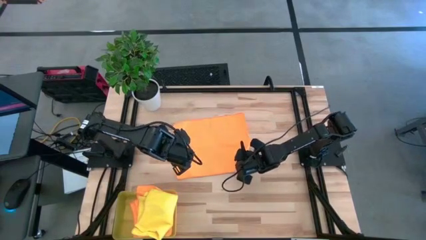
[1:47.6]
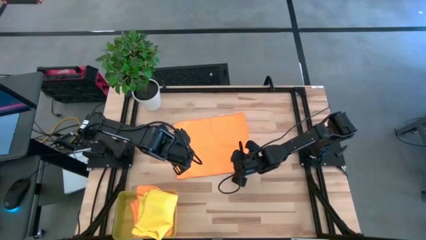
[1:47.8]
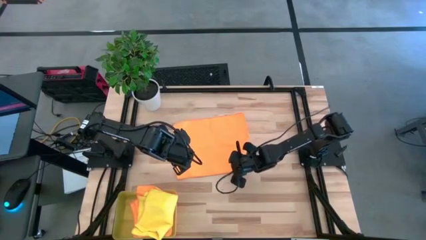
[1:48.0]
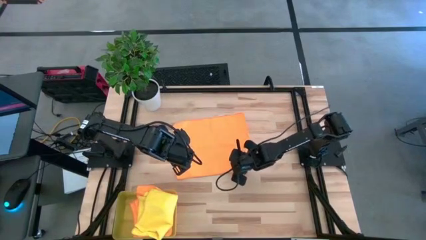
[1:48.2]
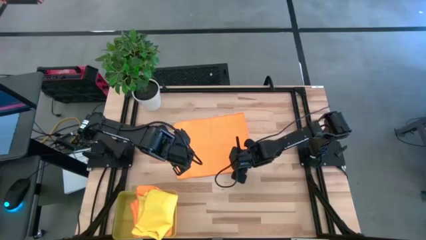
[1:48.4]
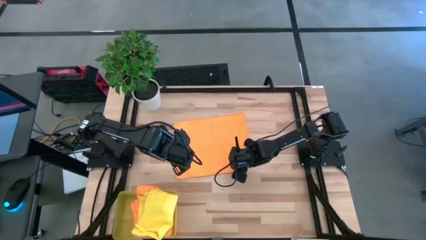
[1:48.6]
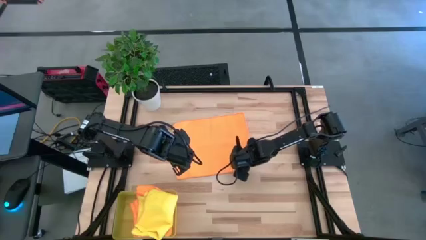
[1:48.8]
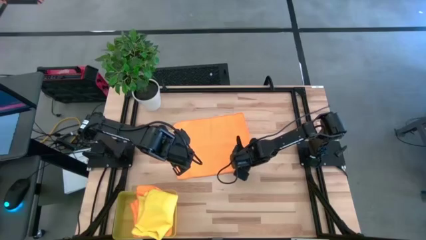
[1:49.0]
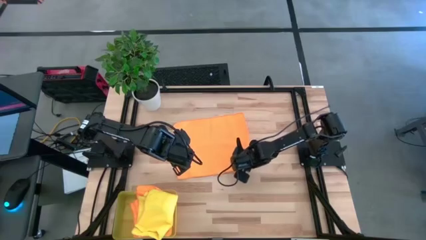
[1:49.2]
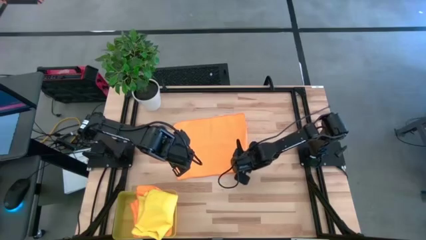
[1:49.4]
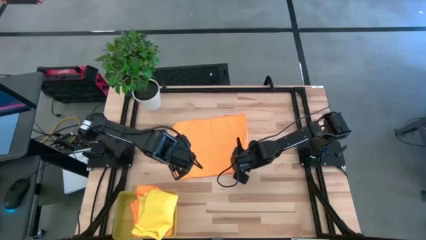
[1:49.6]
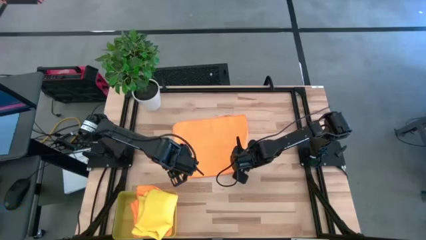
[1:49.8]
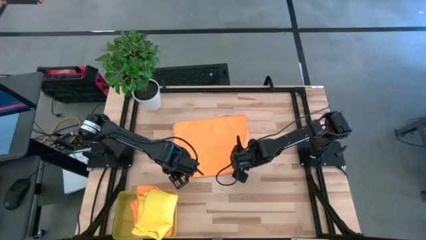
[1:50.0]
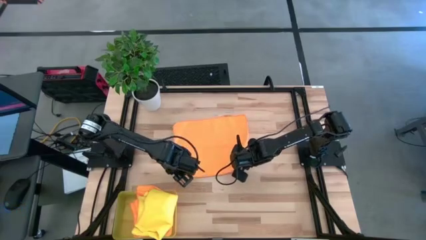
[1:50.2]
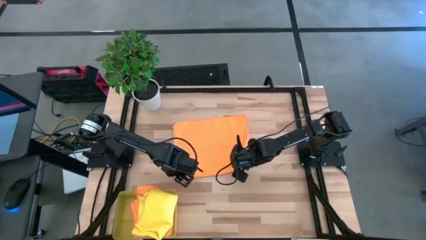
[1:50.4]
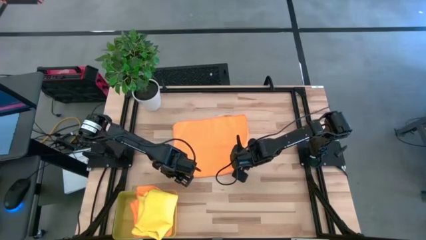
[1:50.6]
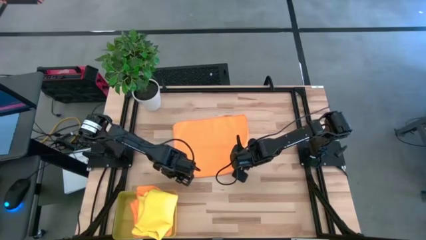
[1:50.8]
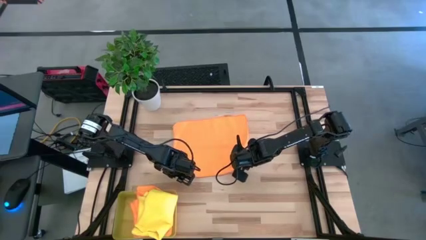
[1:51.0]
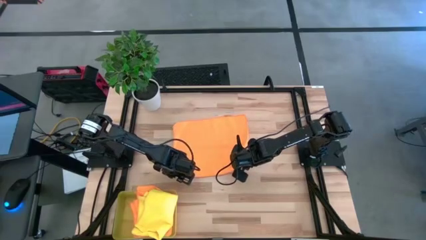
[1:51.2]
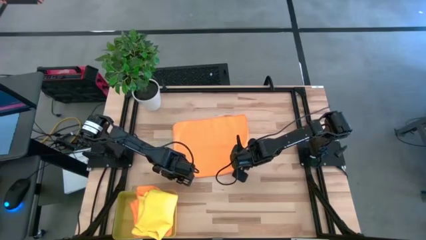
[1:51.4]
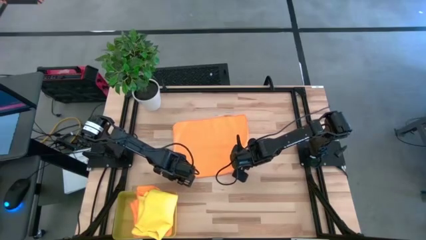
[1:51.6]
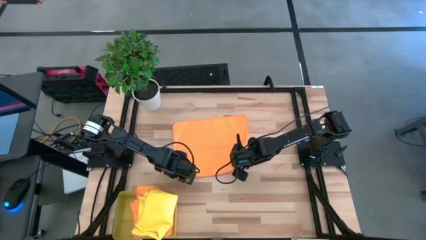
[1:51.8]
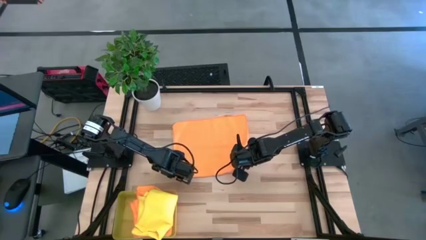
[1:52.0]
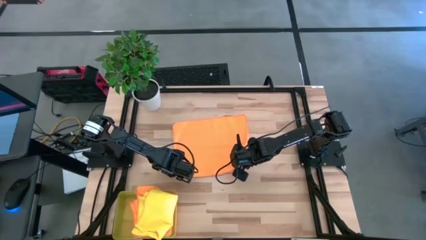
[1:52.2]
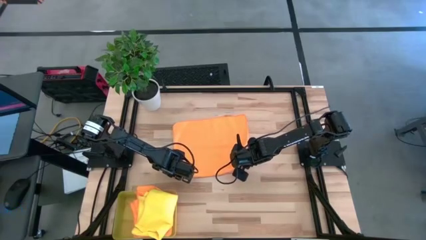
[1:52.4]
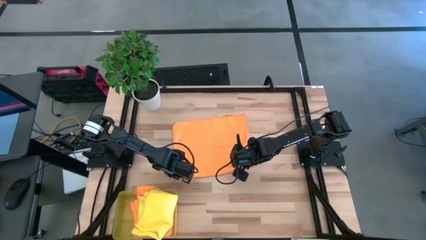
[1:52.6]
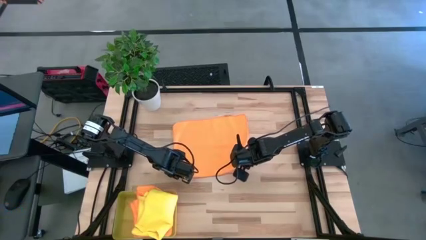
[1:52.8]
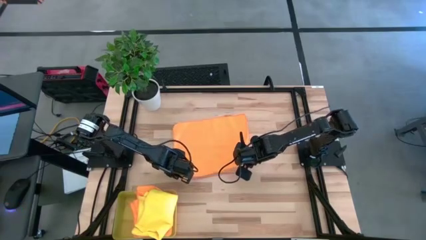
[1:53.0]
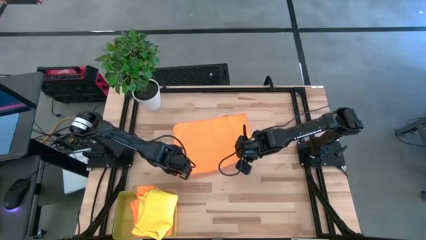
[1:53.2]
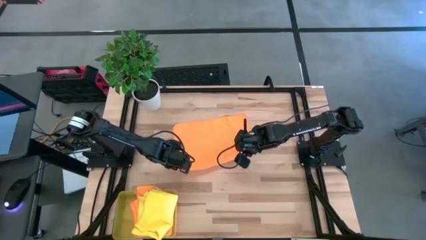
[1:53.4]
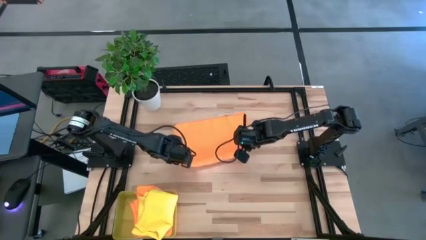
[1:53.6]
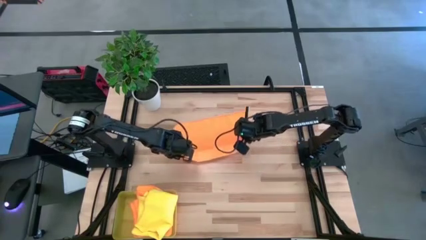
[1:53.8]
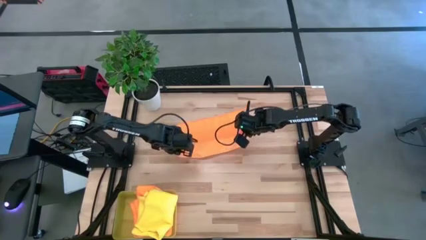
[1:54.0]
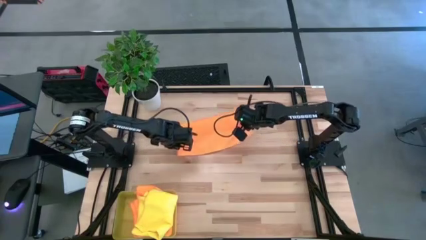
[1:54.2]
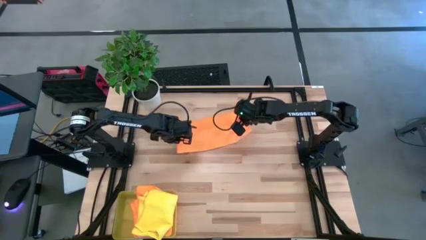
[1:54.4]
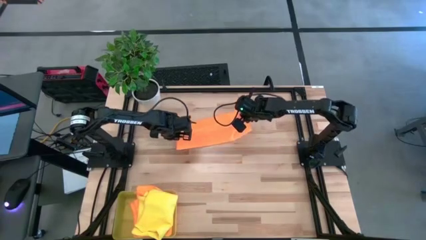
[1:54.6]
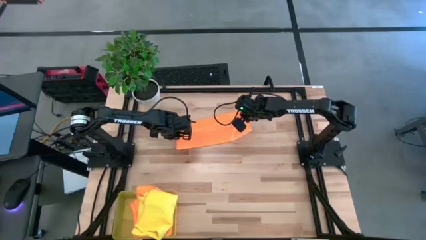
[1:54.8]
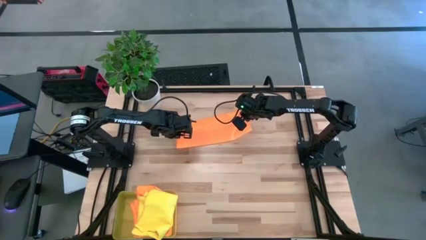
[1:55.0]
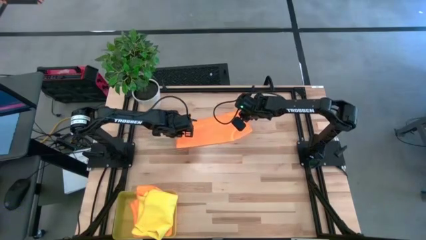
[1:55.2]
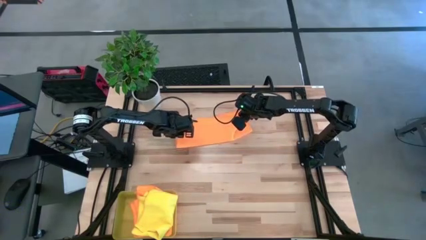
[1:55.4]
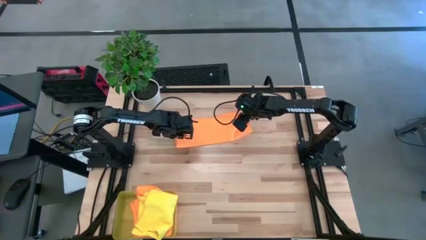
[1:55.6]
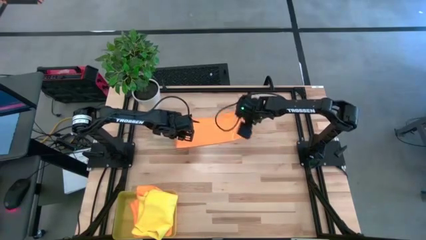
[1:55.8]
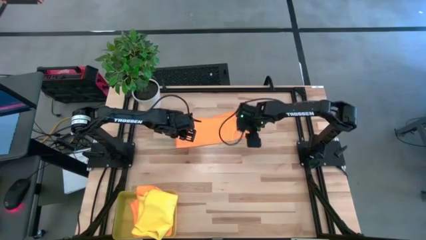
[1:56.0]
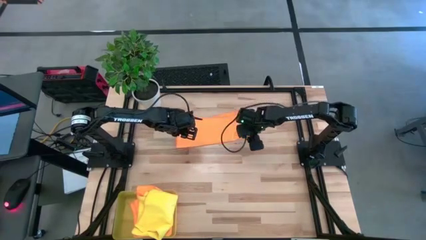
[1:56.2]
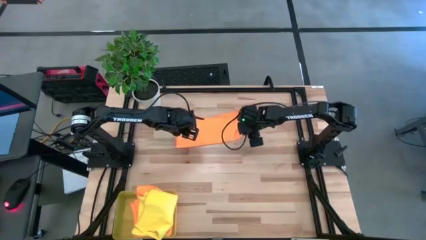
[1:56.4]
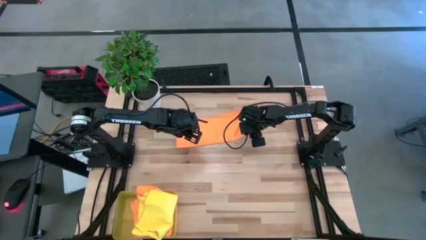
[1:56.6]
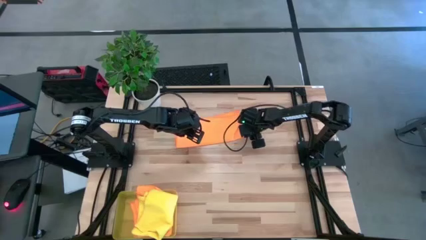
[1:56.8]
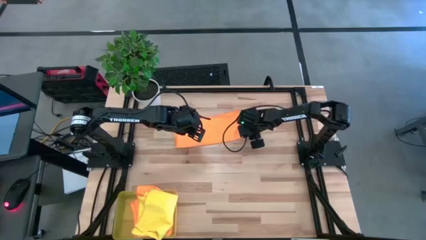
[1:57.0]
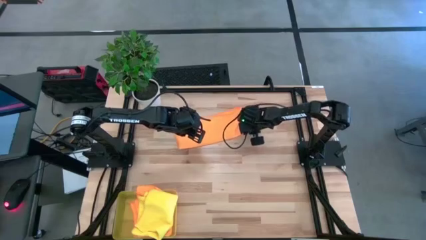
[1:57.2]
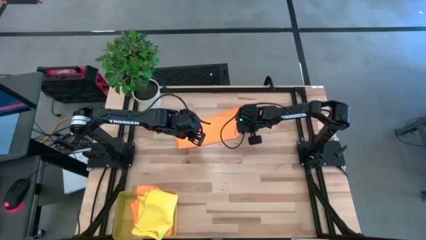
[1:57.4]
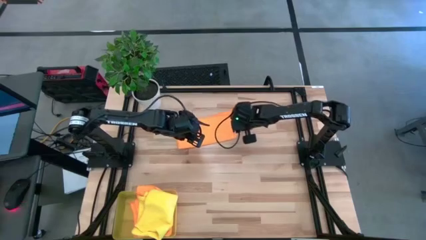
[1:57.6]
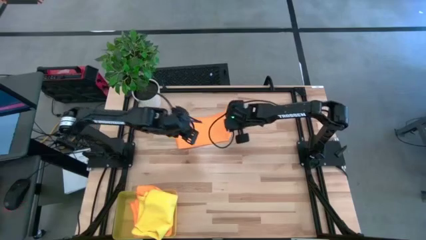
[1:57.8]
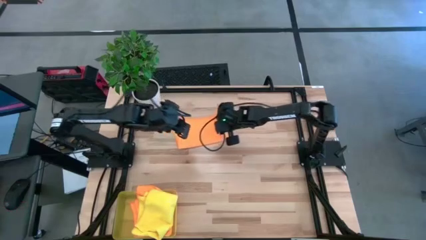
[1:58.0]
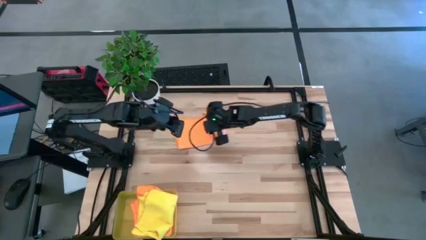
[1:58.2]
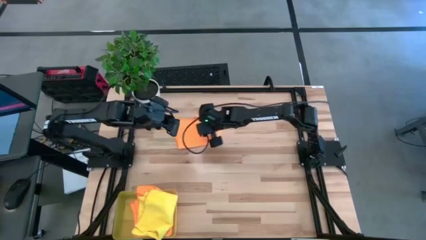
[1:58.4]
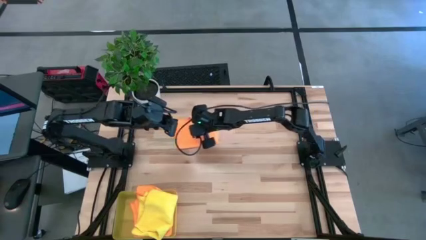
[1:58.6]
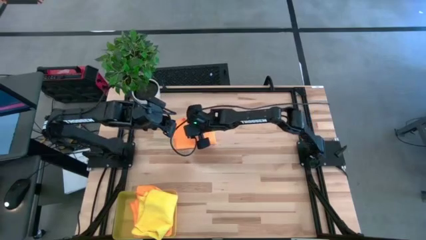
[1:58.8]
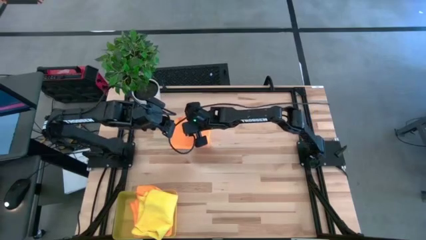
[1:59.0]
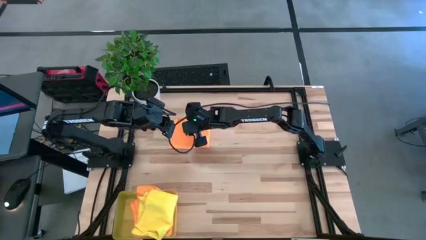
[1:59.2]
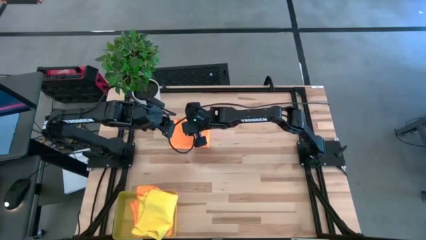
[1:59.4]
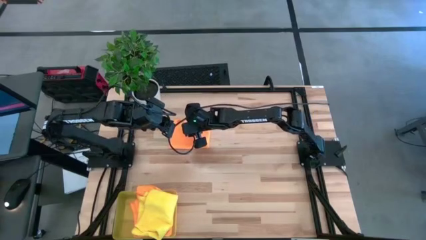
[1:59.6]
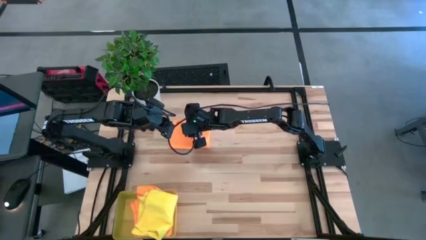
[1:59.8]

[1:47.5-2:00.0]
Task: Fold microfiber towels
Fold the orange microfiber towel

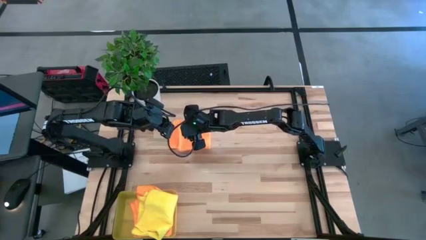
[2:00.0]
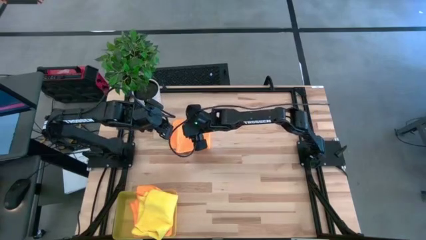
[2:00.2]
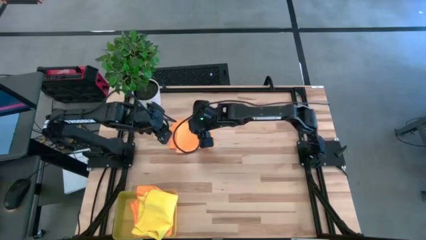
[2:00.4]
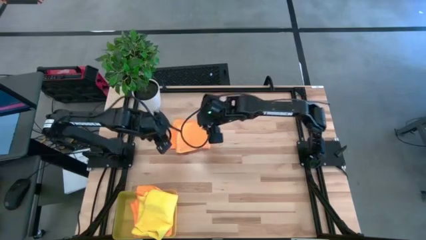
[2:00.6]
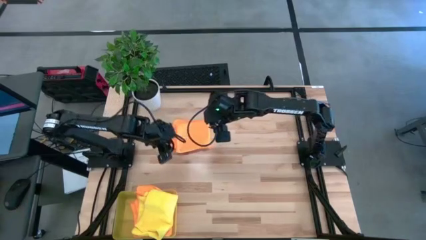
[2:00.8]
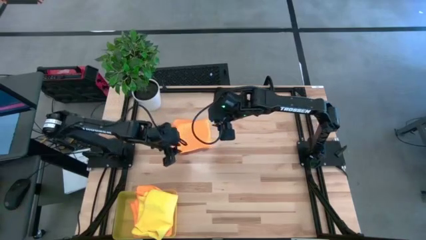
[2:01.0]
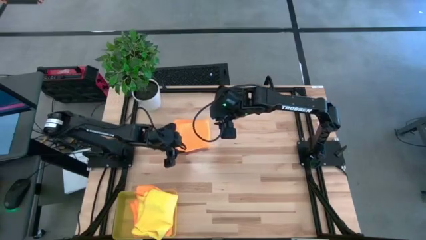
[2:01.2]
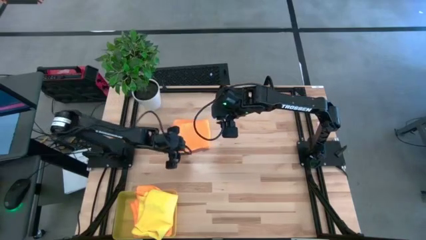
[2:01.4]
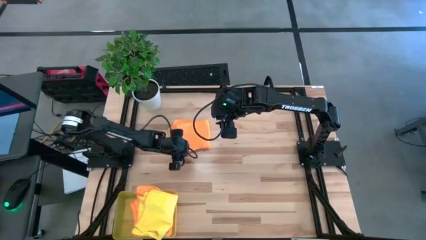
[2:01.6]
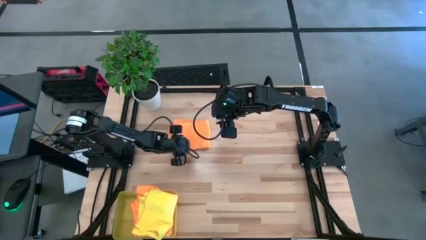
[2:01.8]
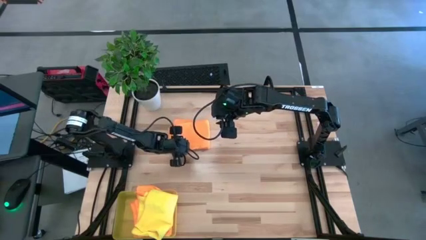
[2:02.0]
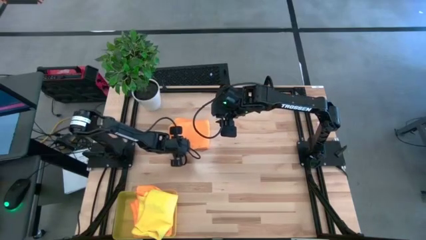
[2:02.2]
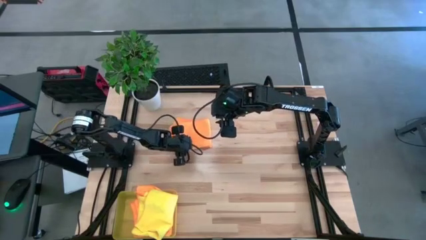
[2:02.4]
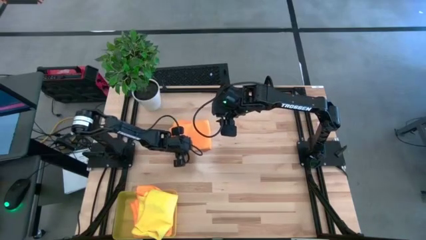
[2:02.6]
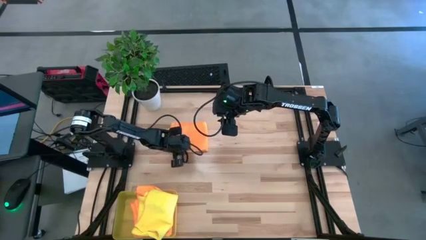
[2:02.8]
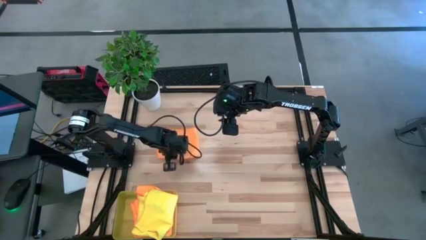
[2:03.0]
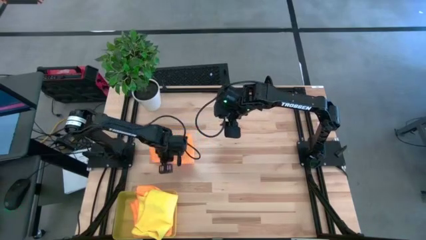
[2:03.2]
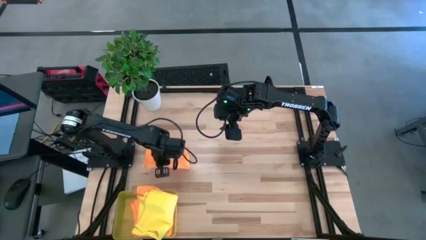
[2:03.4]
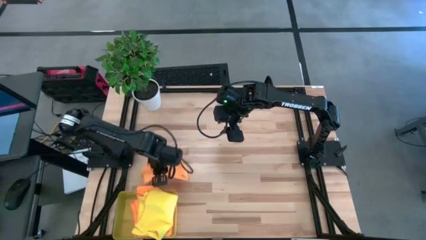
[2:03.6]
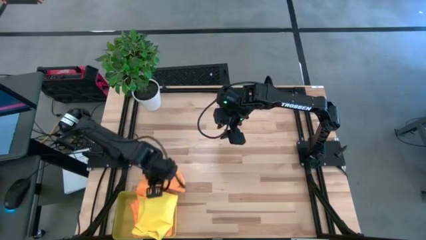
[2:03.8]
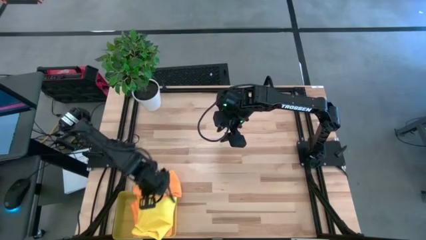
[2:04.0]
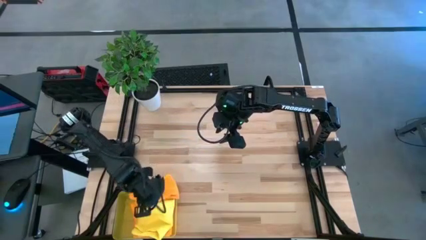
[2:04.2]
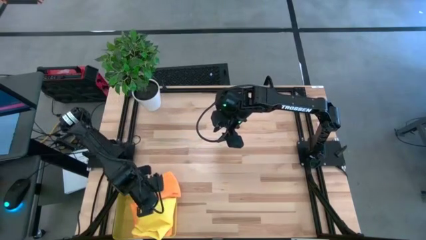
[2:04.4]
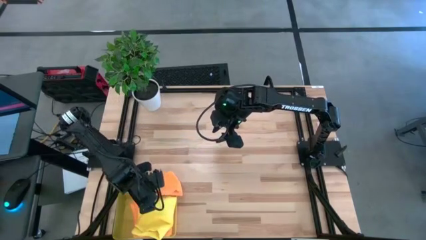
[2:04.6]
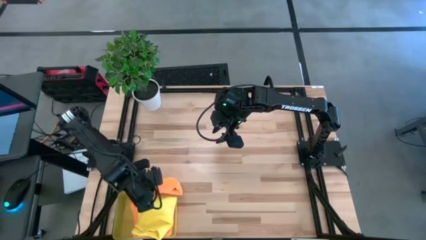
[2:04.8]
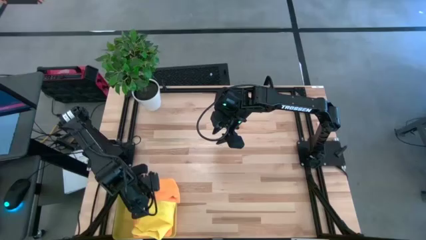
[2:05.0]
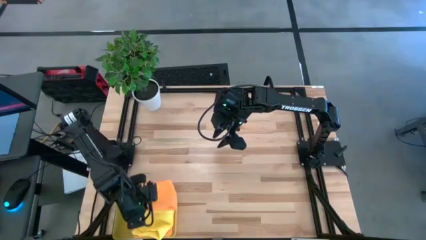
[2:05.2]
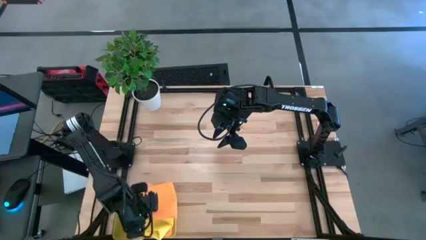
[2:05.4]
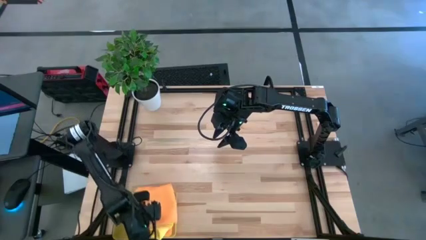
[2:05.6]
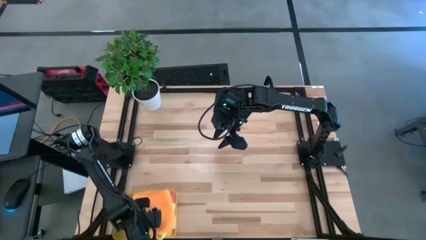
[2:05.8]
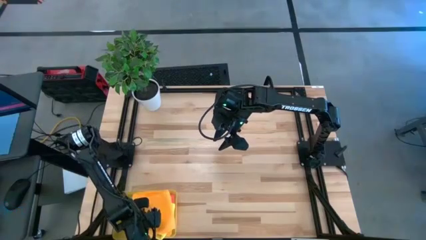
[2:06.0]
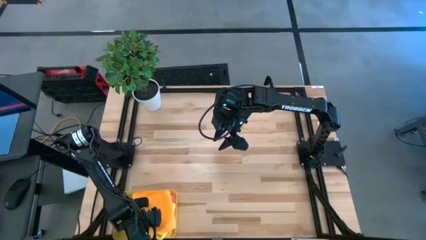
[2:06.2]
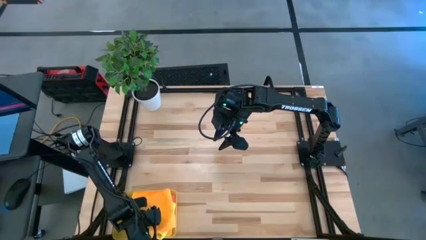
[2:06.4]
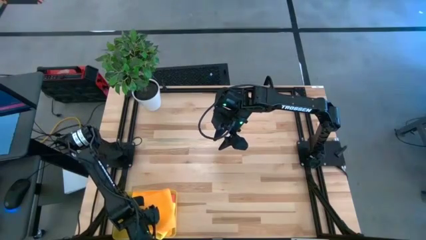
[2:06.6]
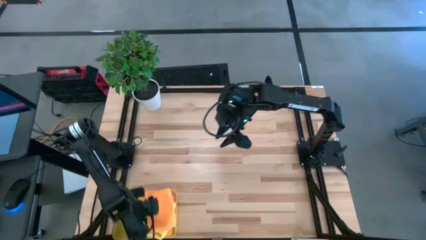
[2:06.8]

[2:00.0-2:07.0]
Put the folded orange microfiber towel into the yellow bin
